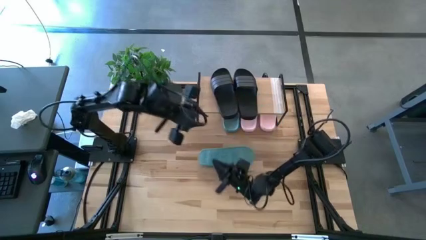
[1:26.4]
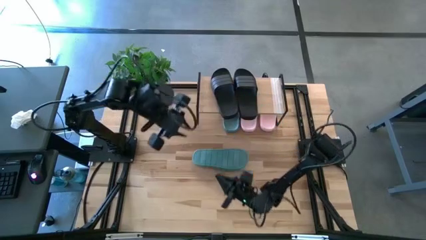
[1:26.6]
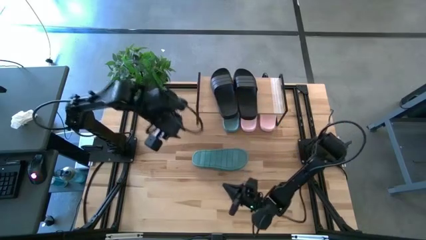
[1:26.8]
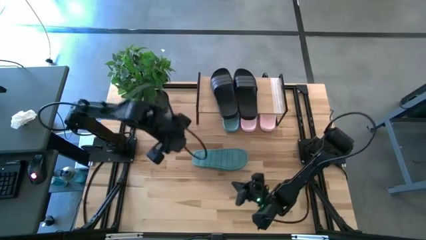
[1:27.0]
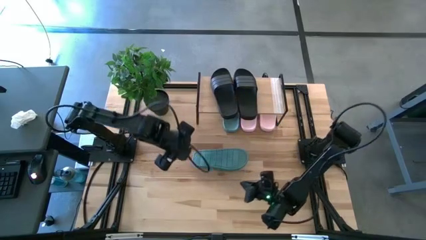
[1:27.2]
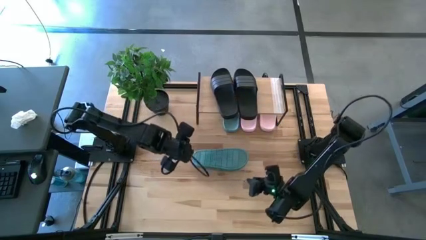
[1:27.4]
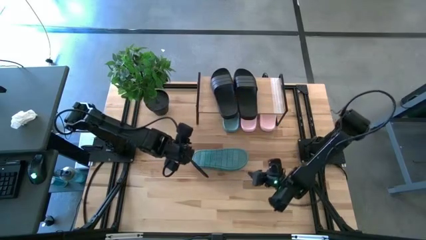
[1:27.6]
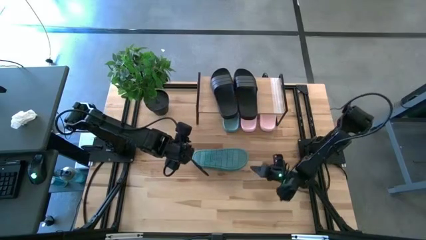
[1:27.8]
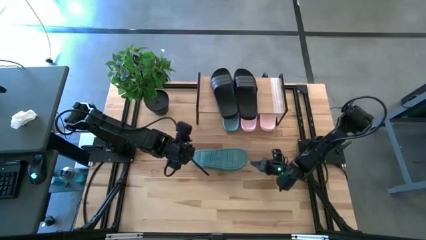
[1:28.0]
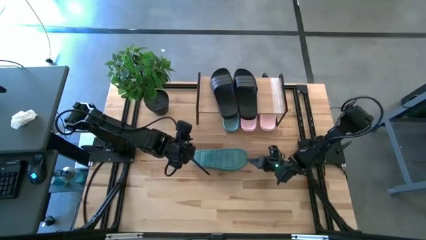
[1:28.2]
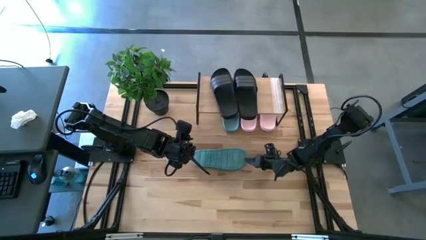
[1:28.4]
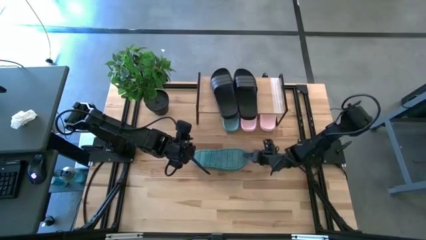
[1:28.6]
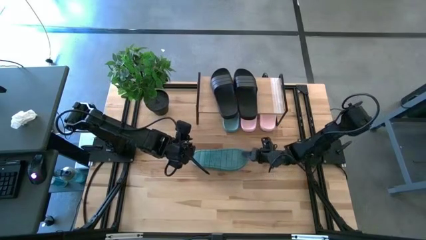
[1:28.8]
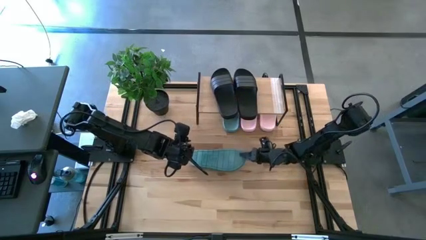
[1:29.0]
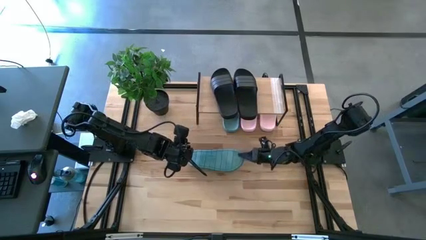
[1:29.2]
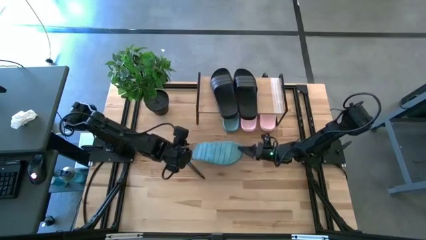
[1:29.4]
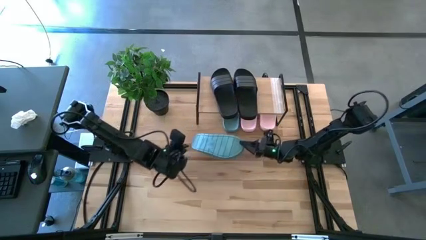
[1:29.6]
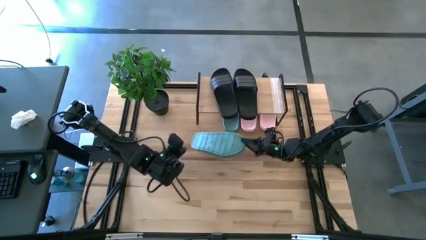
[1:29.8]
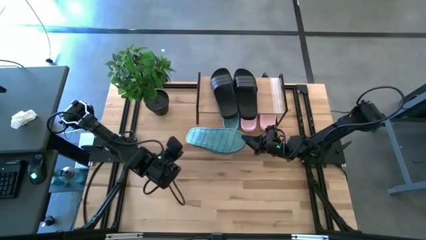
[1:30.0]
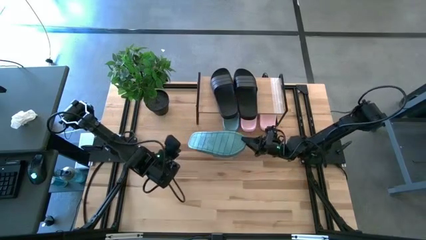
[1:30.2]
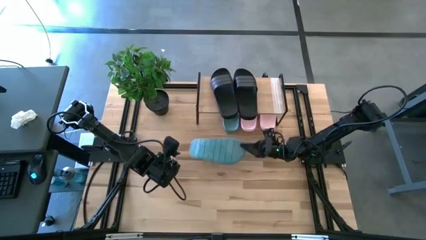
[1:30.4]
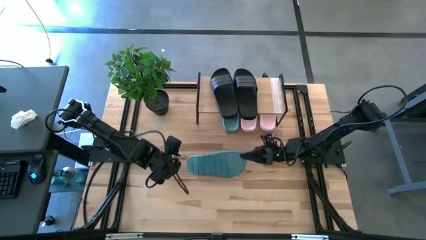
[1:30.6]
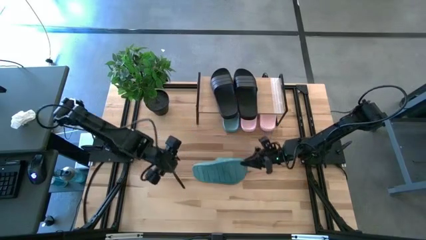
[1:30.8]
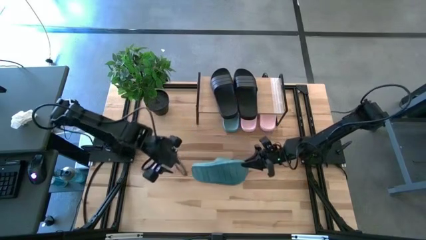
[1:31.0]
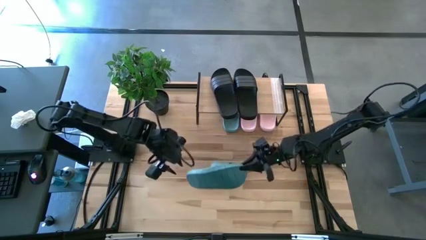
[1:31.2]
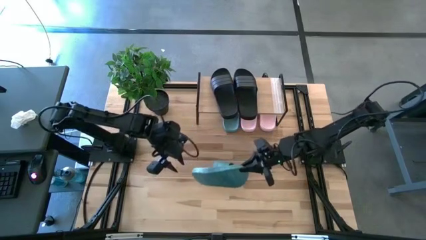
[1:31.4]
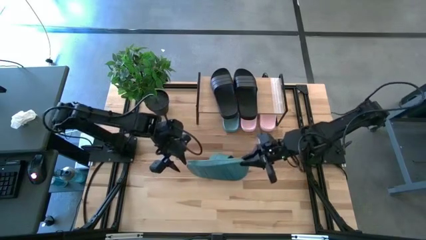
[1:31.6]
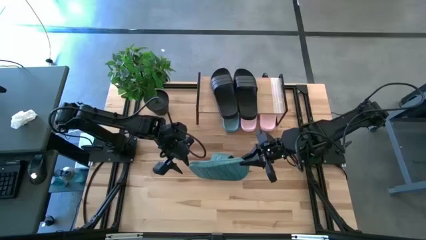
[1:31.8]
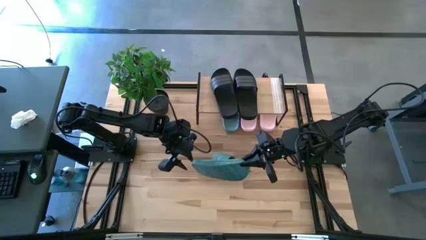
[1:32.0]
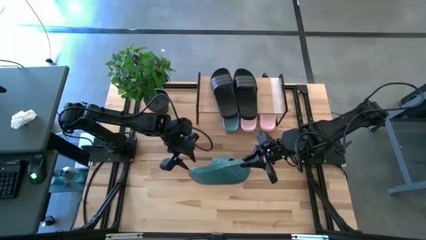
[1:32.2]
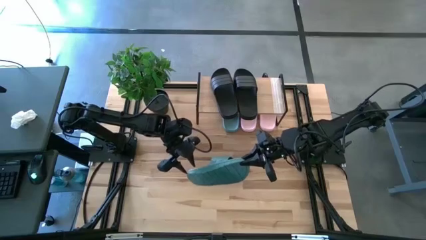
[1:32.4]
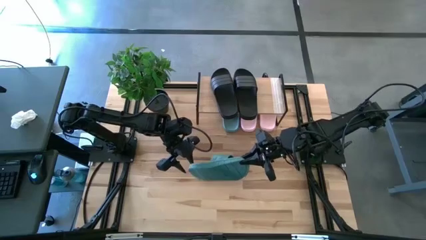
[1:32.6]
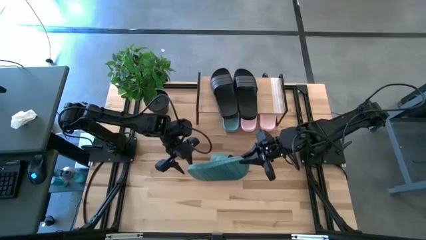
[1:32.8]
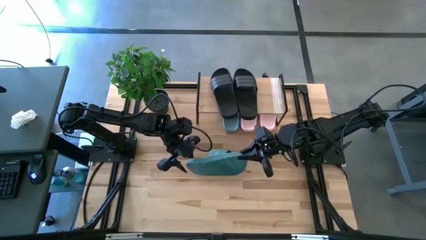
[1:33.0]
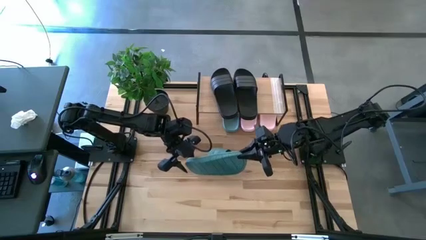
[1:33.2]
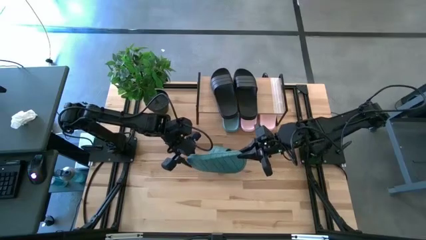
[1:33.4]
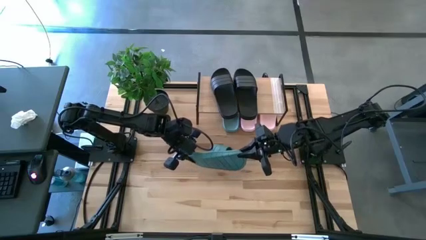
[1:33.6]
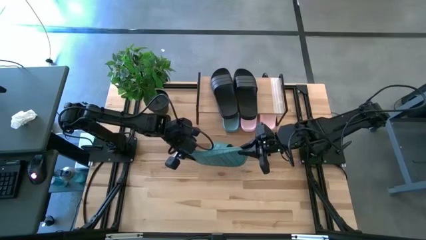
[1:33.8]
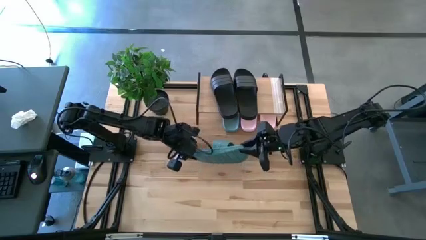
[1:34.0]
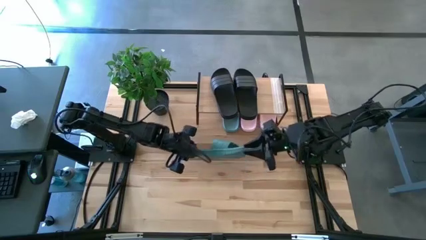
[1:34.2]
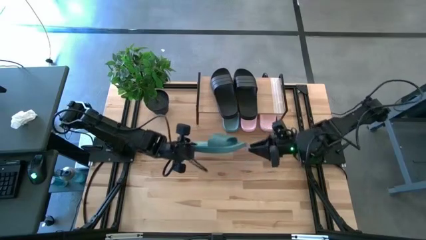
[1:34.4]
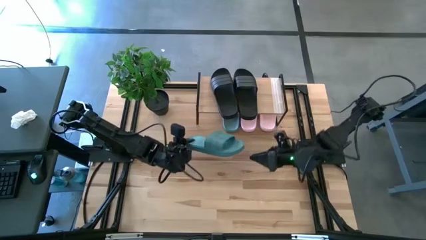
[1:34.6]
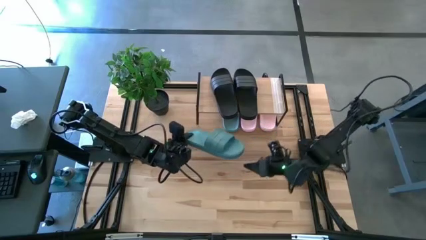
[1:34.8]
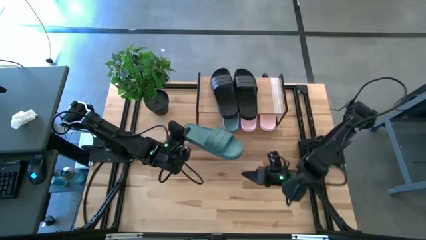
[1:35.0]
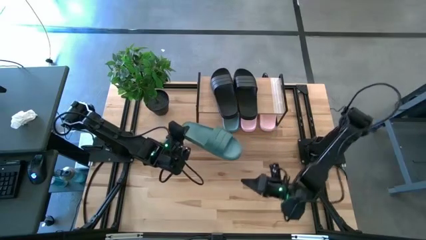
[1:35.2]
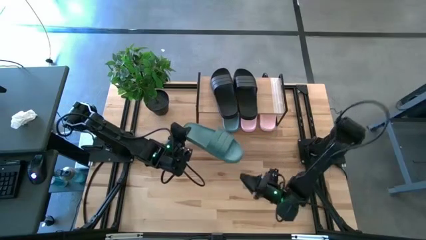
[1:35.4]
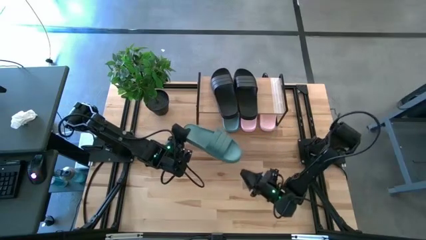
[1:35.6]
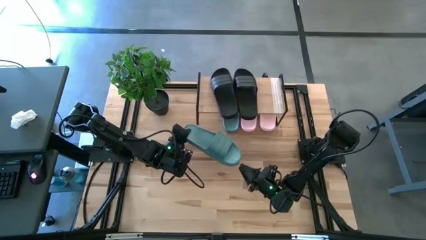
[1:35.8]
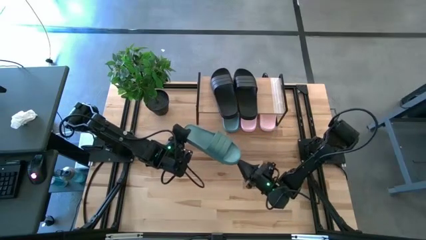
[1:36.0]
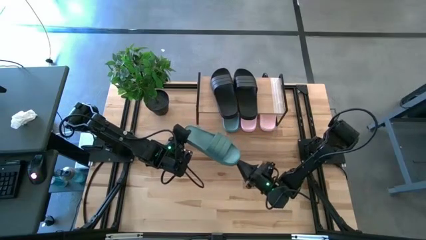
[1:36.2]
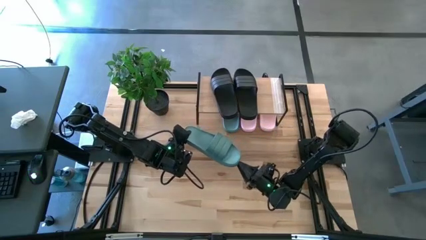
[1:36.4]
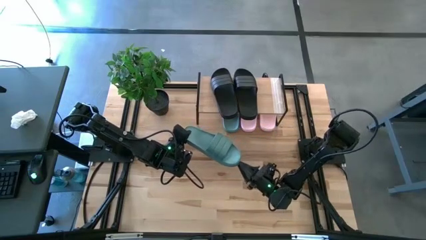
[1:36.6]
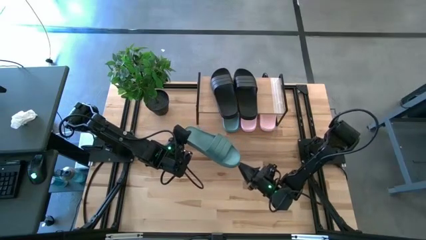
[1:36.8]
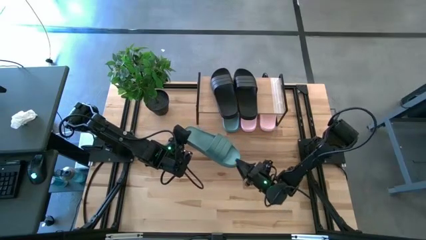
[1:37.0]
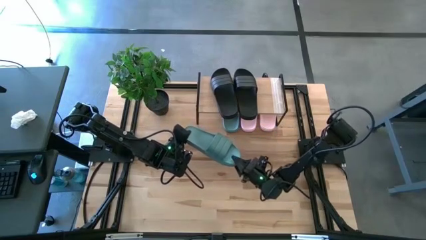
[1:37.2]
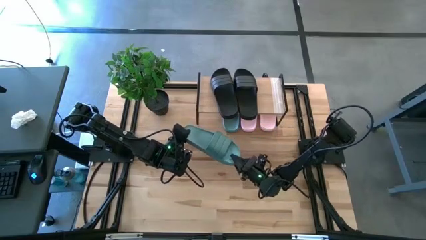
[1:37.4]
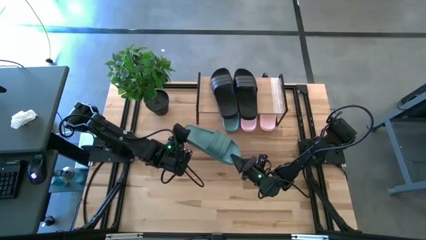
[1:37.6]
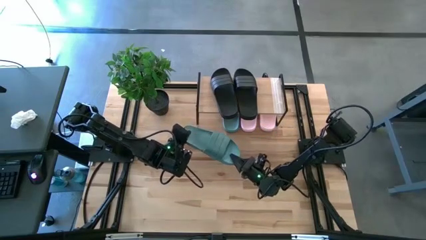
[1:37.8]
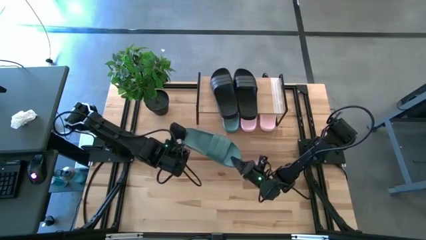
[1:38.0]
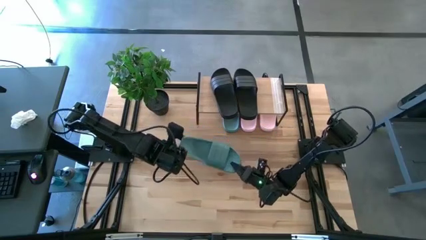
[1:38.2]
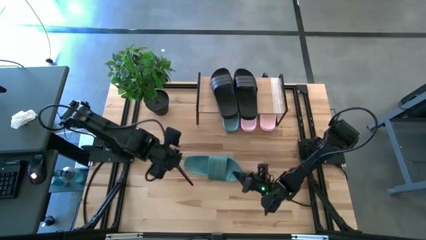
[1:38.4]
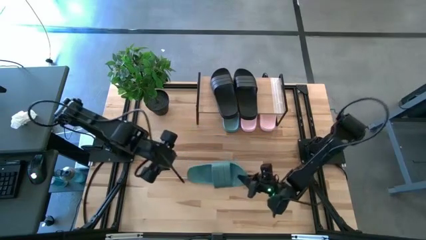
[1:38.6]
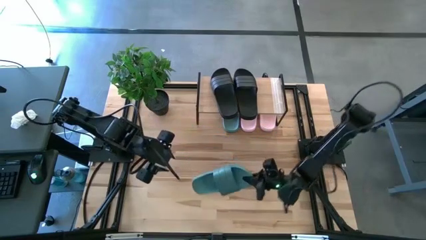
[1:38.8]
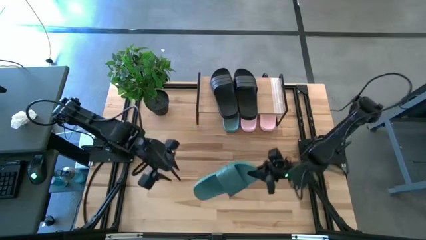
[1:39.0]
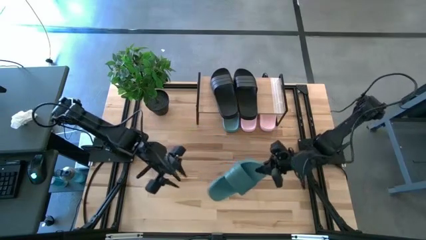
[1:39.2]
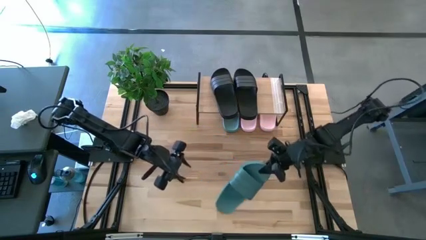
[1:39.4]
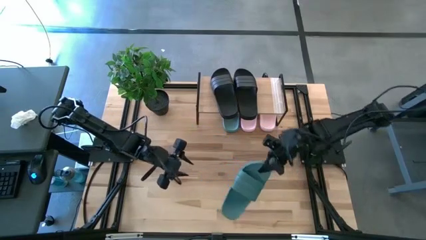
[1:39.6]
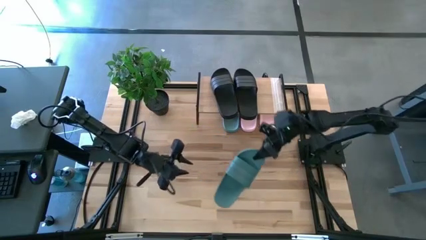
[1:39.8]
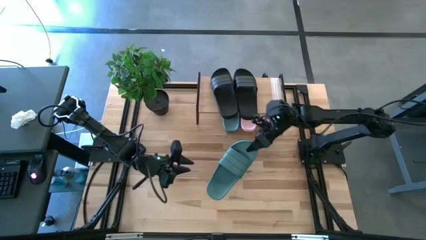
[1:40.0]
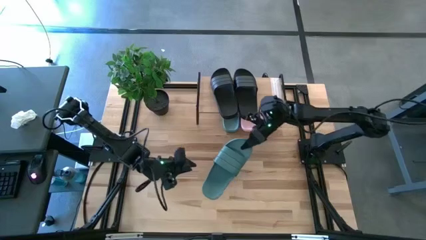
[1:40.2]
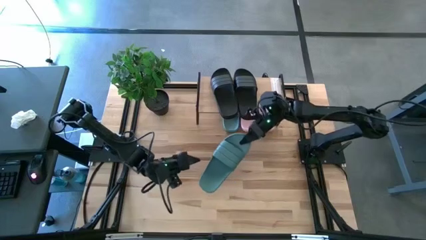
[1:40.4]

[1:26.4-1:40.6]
Task: Pick and place slides into the shelf
Put the green slides under the shelf

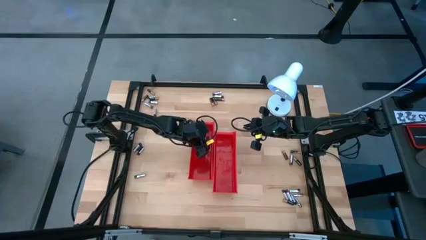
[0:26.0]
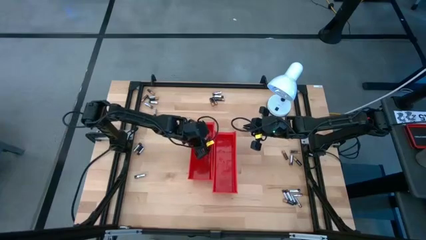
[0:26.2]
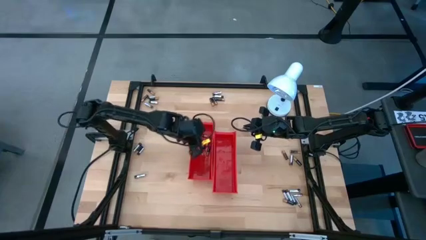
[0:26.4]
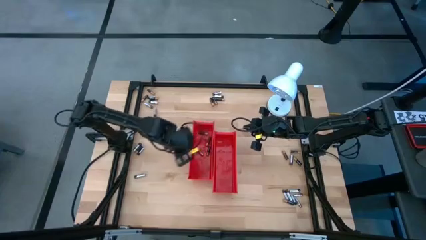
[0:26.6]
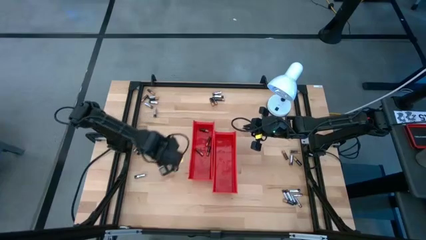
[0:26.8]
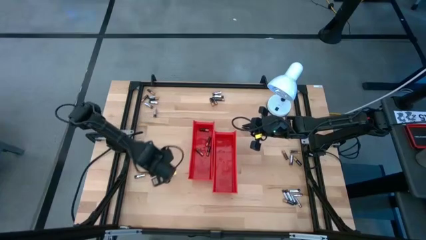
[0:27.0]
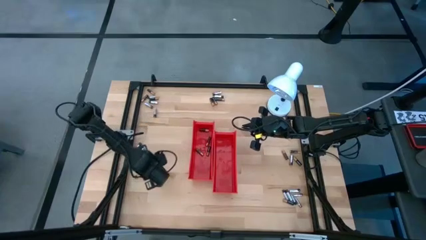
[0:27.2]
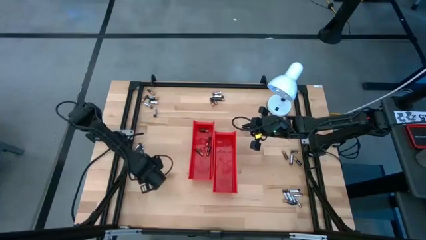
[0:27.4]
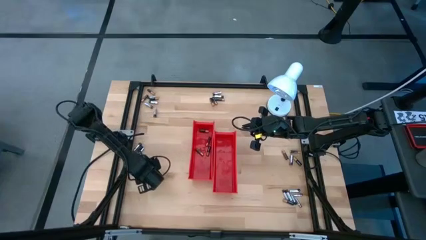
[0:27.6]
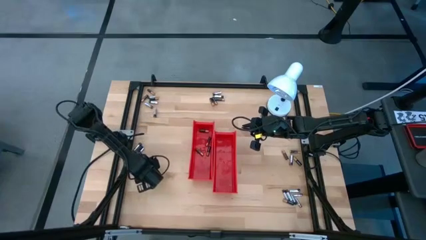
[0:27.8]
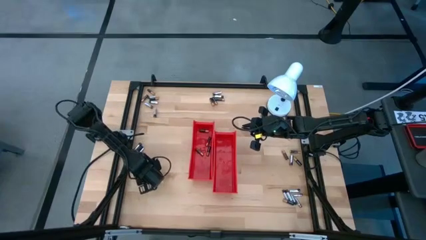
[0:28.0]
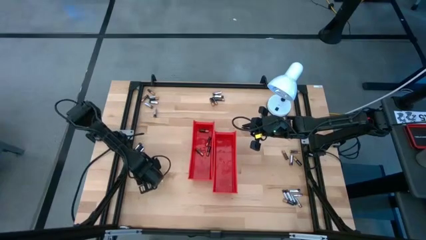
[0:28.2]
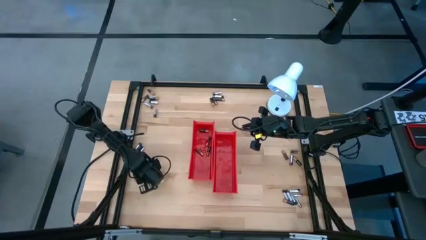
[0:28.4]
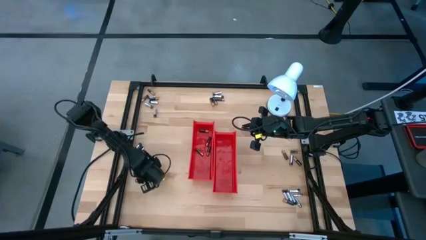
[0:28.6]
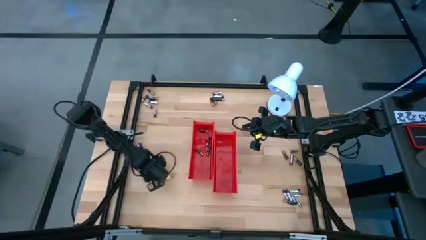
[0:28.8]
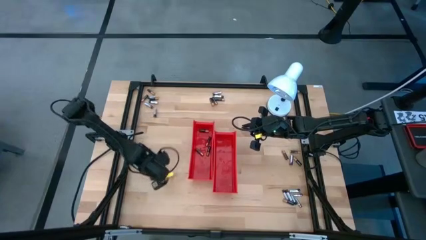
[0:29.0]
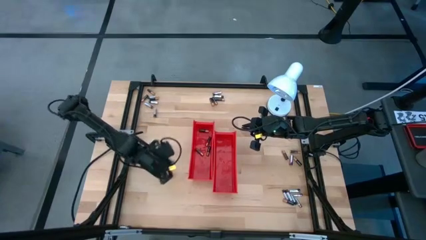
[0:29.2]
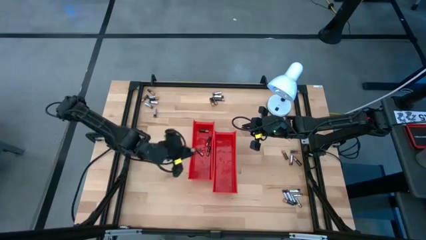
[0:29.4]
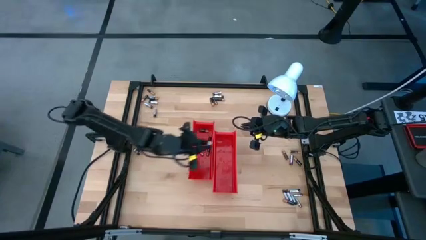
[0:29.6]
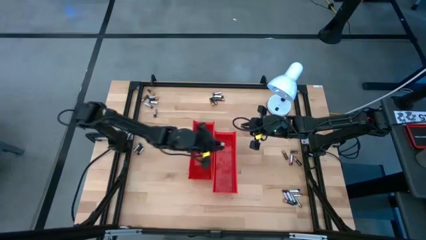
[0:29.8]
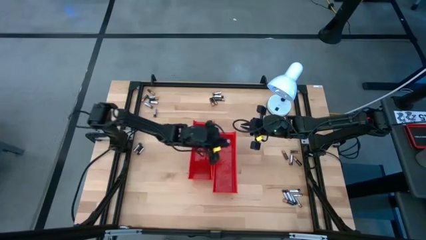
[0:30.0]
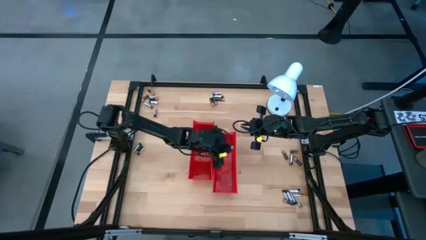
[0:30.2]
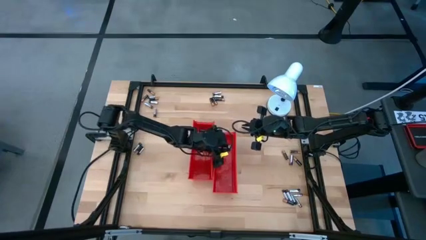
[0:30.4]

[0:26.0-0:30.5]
Task: Sort batteries
Put the silver battery into the right red bin
